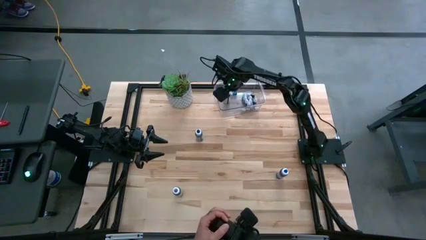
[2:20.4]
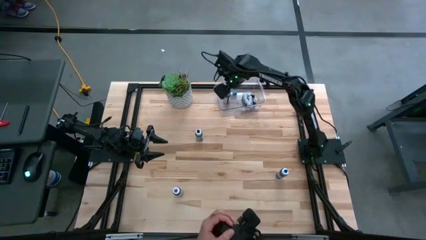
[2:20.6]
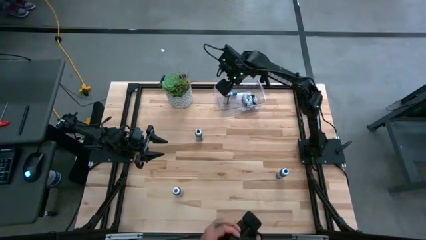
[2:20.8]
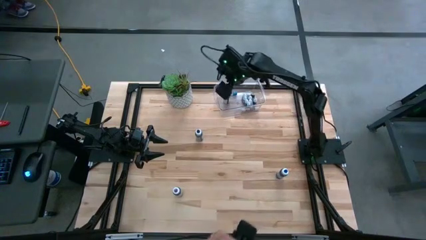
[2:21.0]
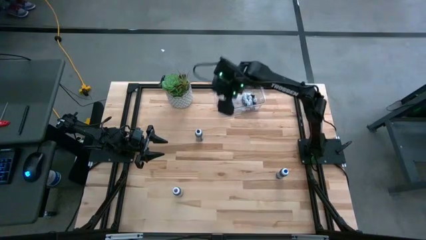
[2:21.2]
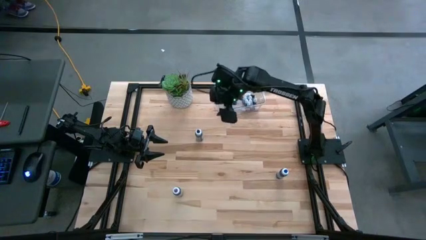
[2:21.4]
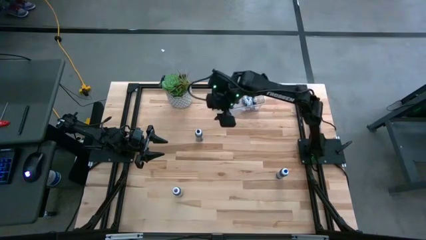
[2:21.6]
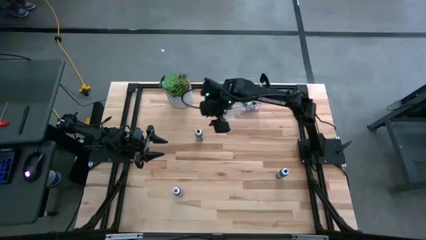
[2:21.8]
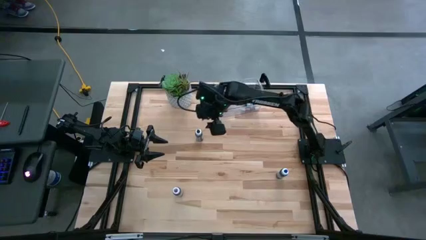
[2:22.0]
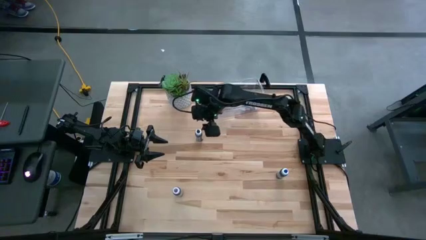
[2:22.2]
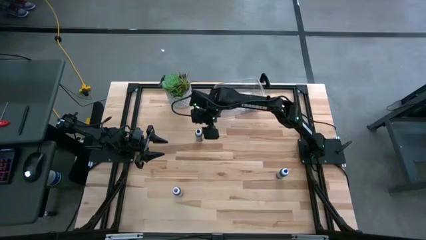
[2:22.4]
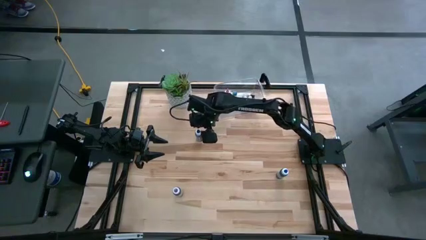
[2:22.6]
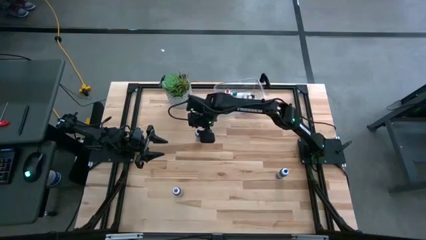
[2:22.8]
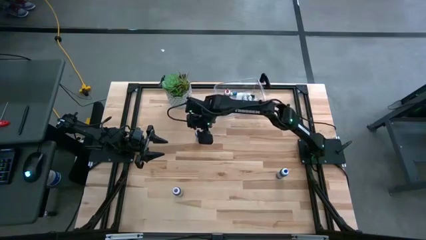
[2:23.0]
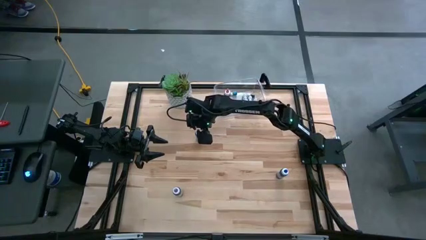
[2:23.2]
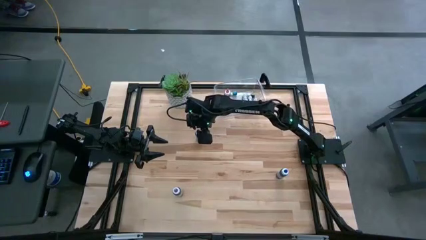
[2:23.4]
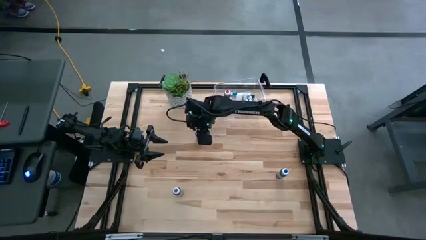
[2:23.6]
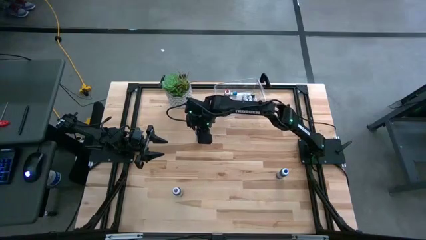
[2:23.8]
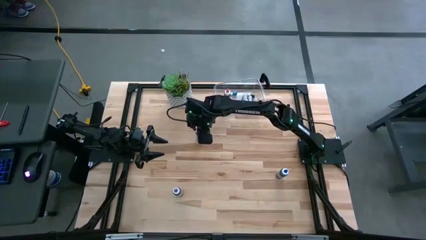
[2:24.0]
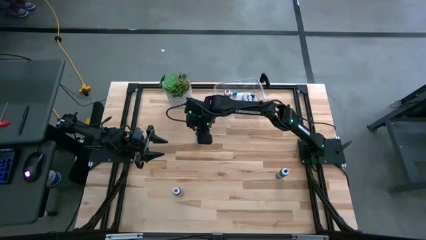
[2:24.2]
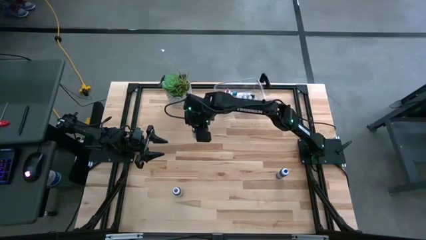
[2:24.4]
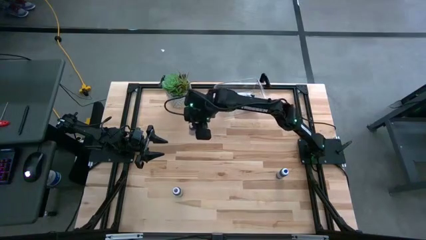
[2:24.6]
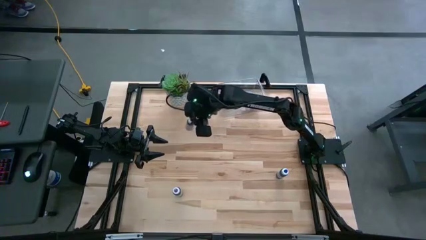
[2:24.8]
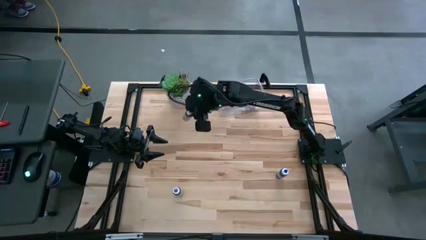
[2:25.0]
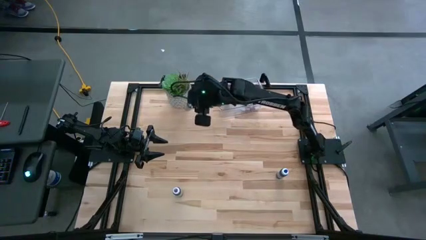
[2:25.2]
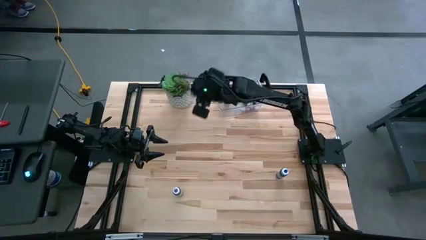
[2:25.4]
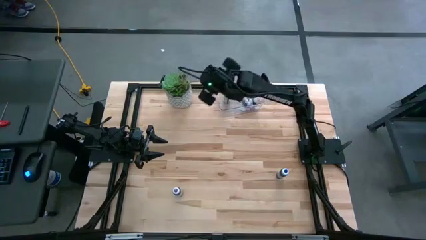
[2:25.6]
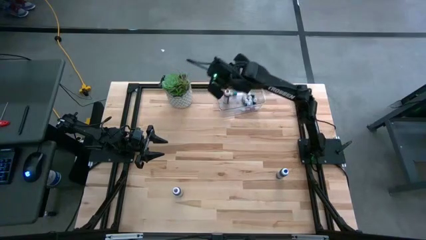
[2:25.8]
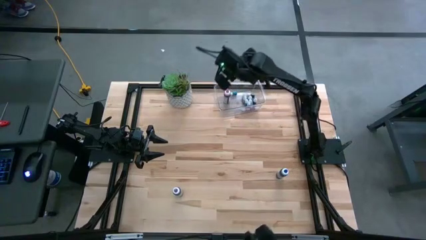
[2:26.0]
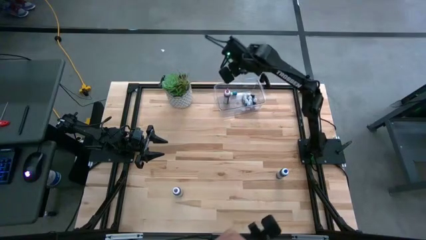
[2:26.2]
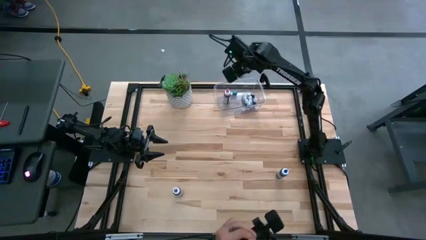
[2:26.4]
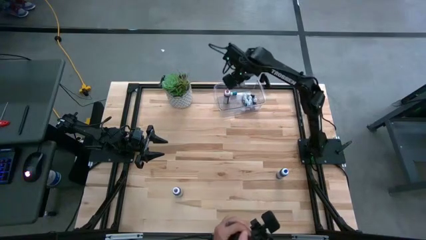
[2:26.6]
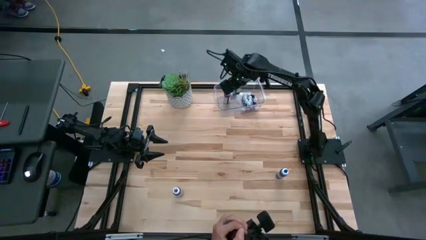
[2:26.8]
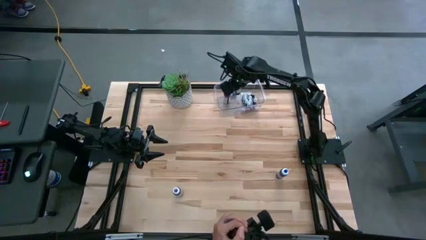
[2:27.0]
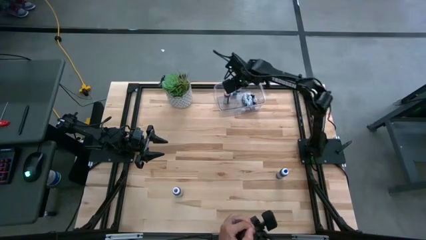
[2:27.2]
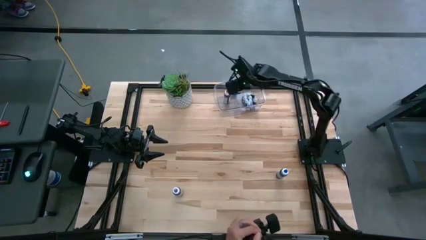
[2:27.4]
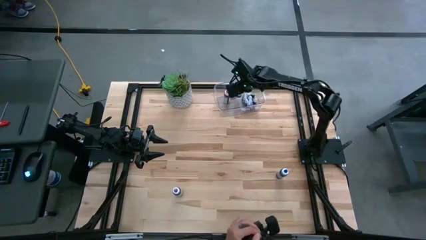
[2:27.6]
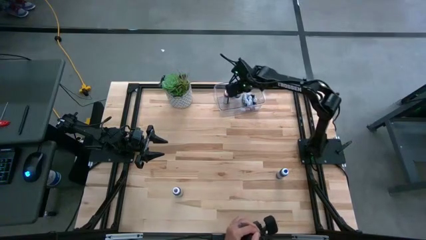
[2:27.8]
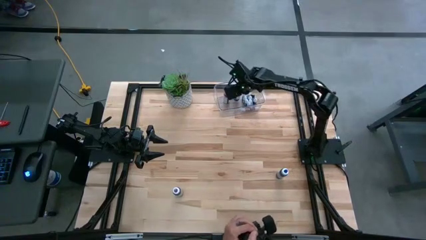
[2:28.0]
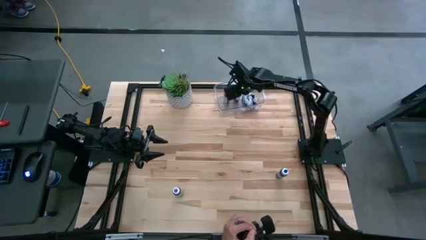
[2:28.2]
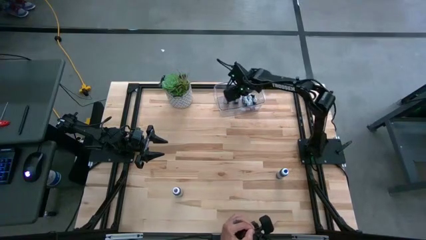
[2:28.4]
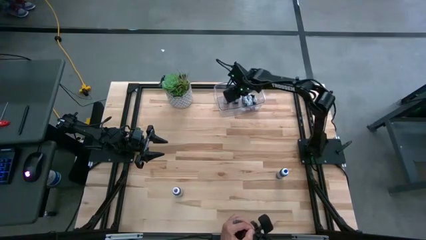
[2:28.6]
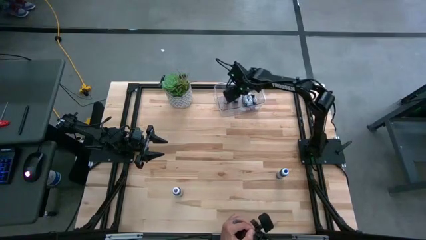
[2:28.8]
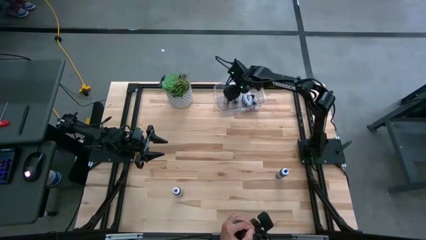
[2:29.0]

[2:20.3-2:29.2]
Task: Pick & Place food coloring
Put the large black food coloring bottle into the bin

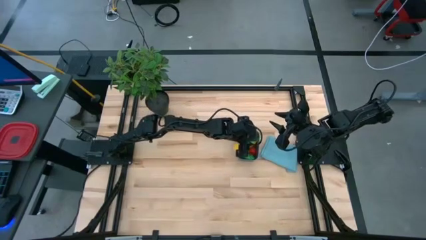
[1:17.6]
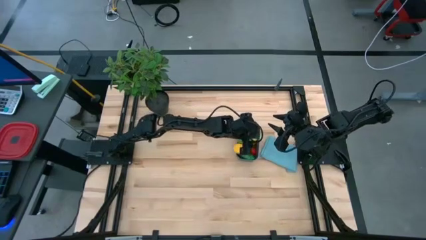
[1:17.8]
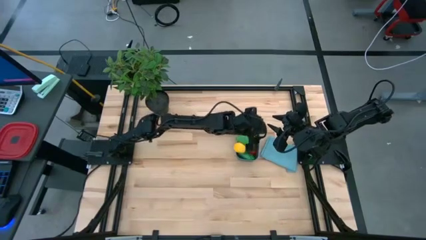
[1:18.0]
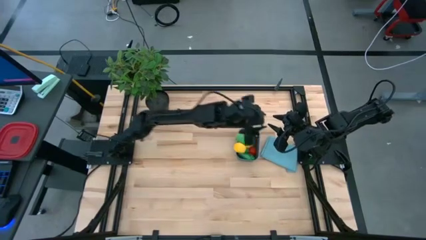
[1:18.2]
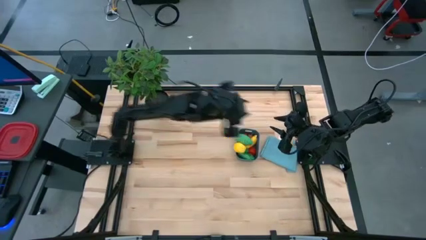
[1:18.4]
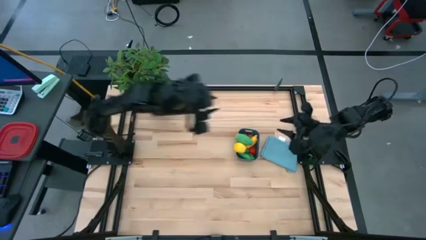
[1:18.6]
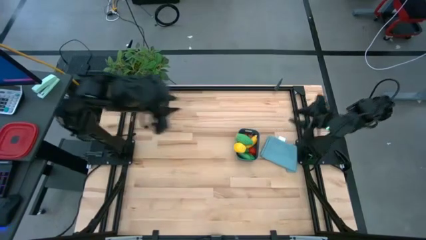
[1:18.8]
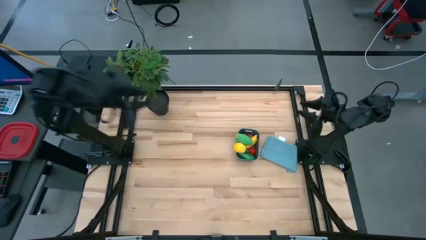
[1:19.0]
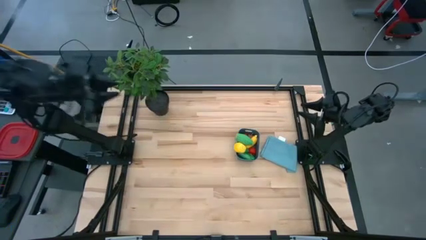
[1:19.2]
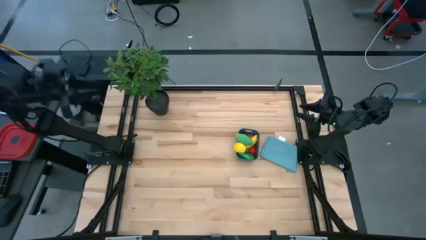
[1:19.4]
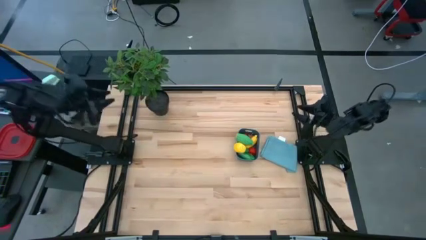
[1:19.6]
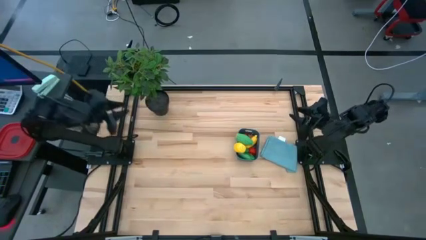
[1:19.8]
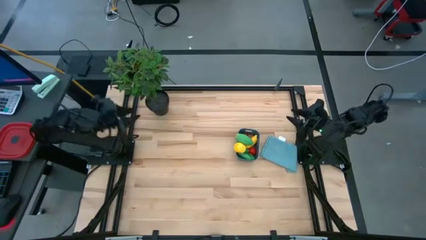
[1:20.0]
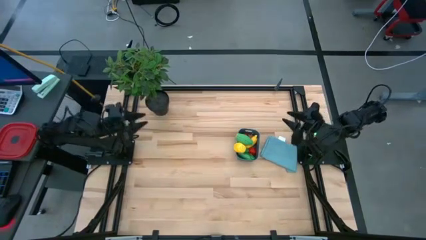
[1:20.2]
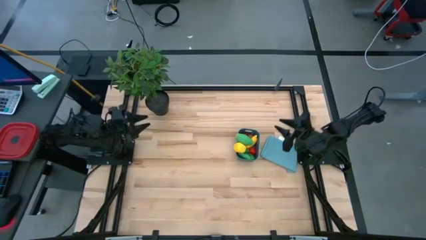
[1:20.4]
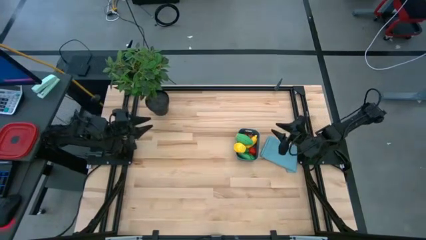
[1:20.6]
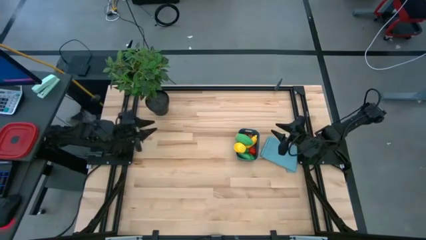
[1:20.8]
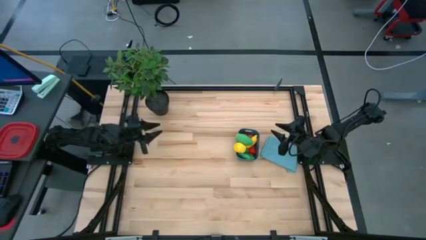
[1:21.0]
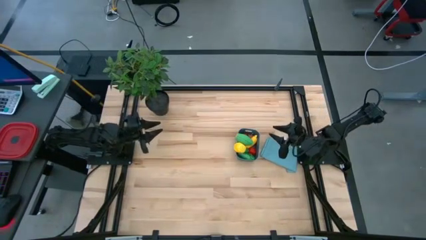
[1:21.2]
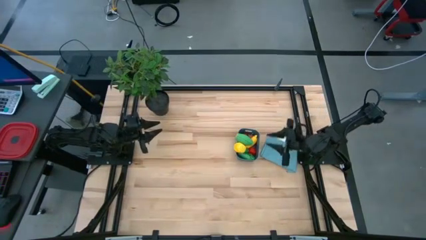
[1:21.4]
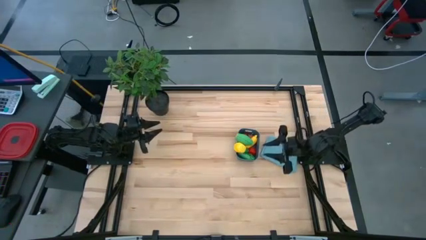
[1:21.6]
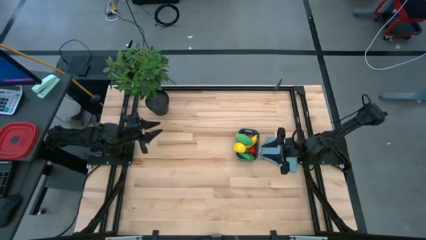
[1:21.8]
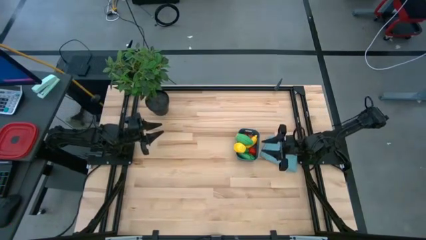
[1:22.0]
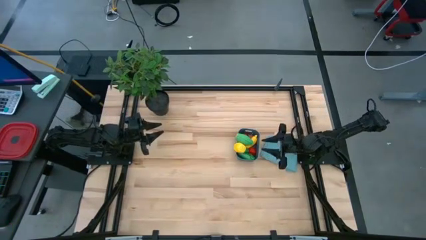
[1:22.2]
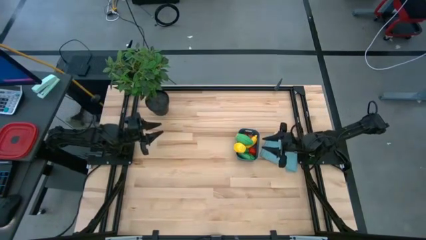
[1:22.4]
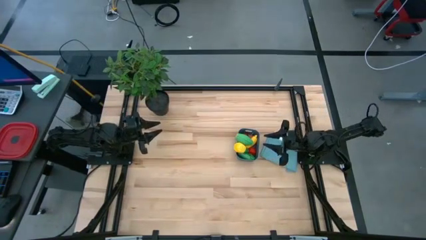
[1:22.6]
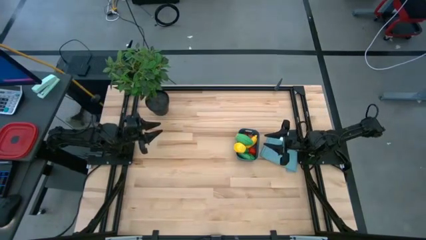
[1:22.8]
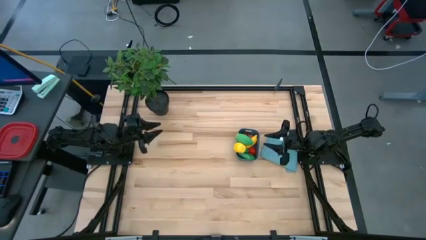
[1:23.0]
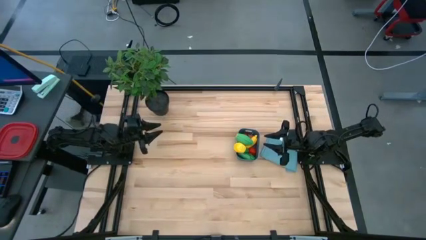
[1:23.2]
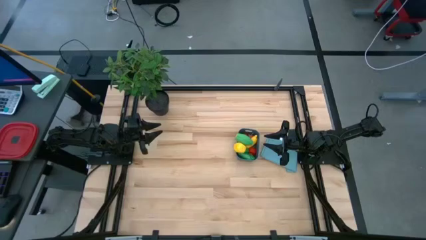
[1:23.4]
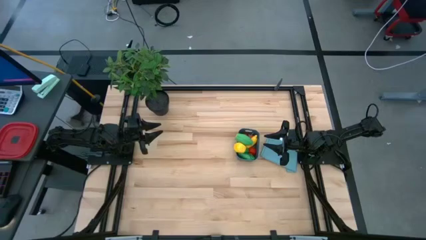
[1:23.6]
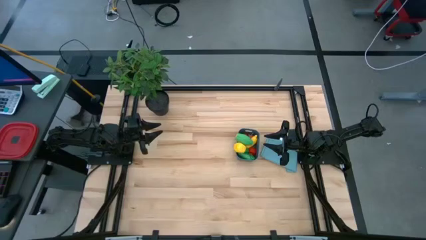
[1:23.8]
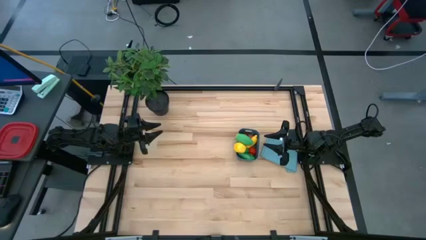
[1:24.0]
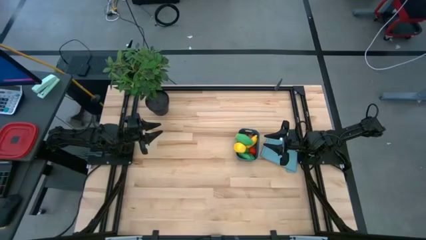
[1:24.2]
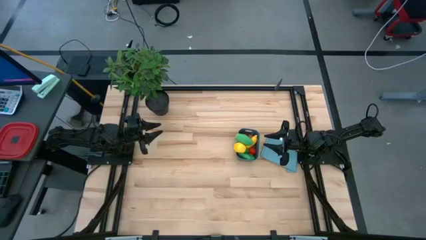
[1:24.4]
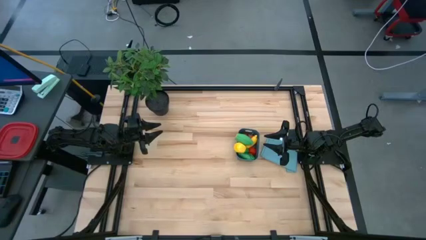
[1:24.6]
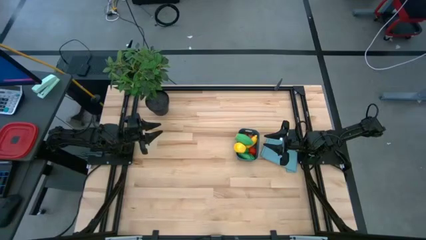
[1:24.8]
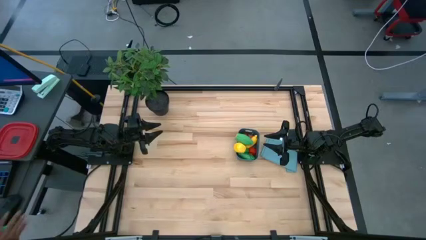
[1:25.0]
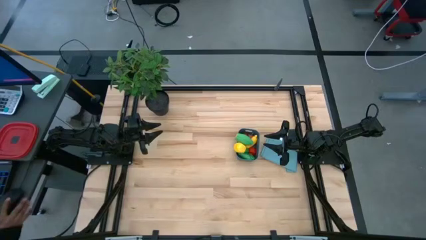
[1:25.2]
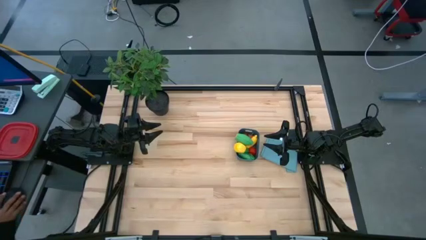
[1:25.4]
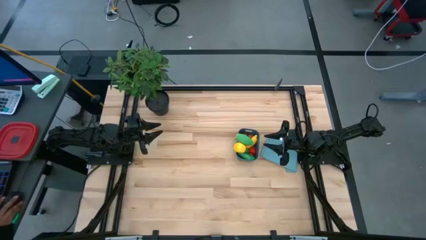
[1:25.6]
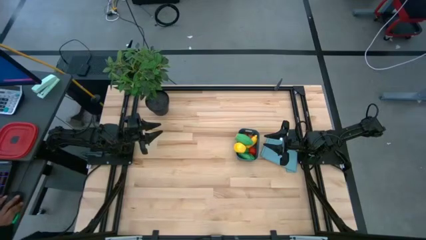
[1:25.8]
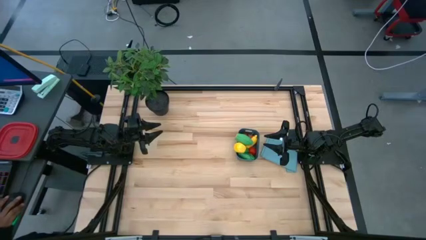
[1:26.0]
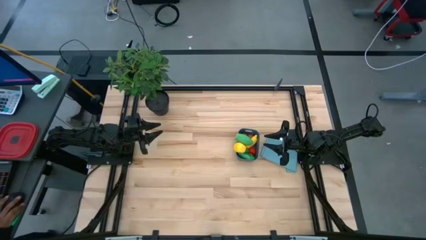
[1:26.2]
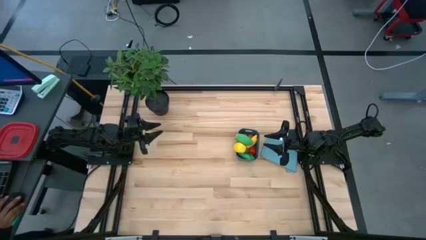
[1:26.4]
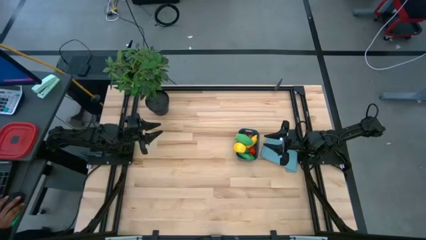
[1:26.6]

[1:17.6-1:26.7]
Task: Pick and placing Produce into tupperware
Return to Home Position
